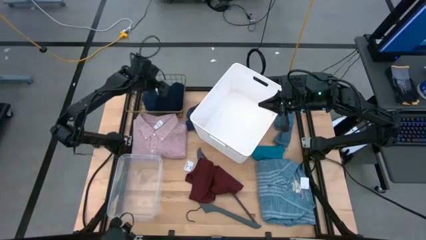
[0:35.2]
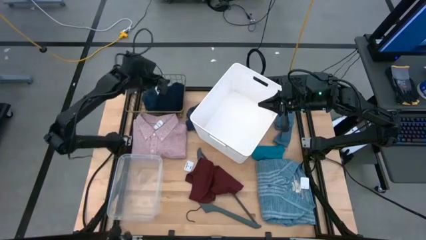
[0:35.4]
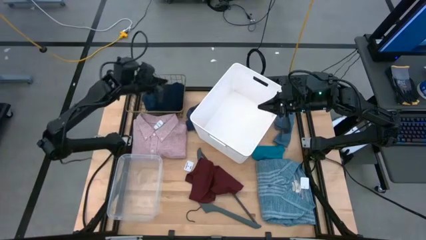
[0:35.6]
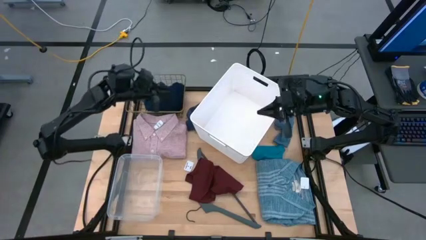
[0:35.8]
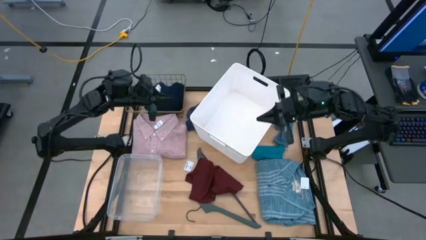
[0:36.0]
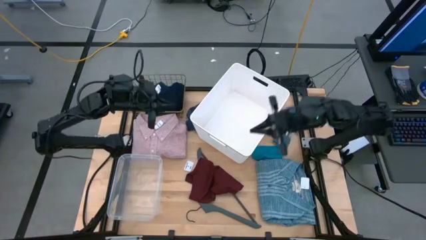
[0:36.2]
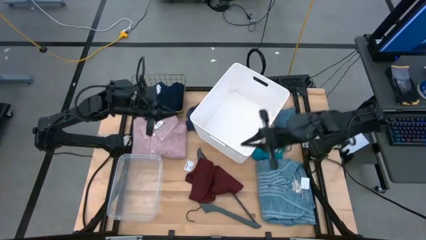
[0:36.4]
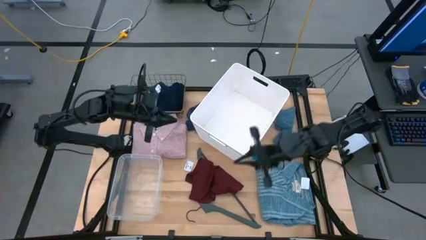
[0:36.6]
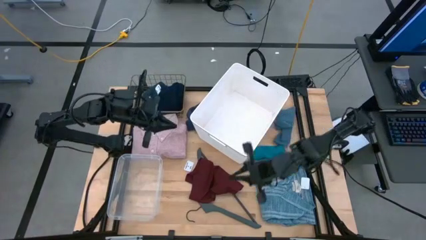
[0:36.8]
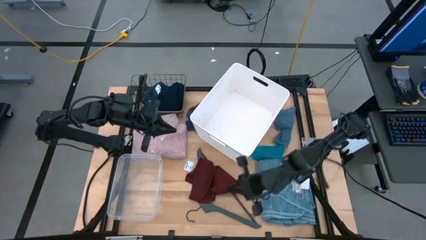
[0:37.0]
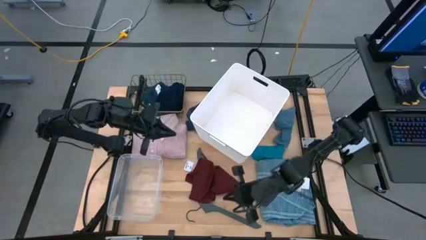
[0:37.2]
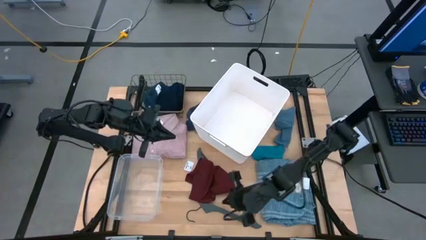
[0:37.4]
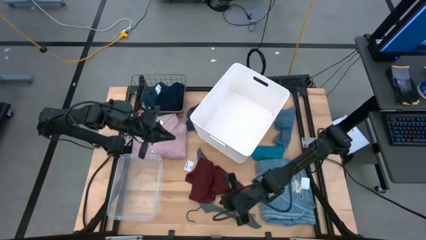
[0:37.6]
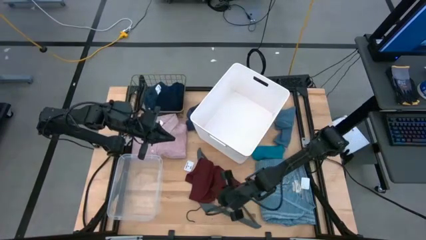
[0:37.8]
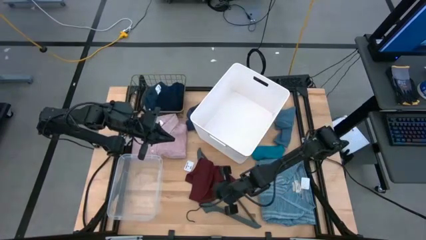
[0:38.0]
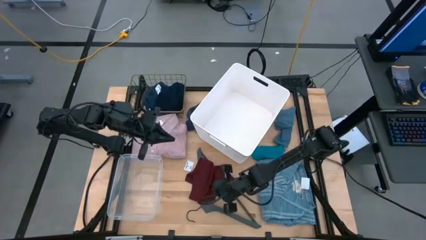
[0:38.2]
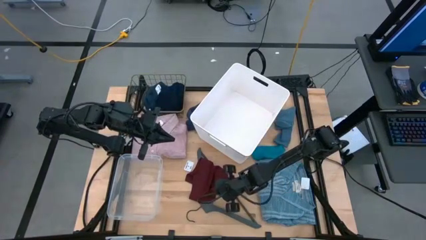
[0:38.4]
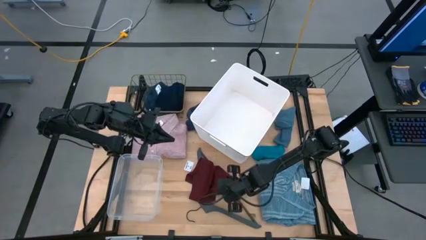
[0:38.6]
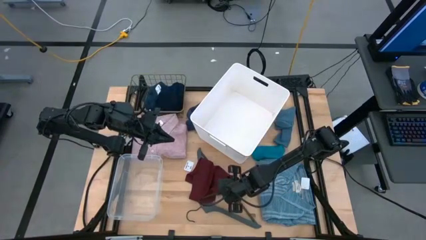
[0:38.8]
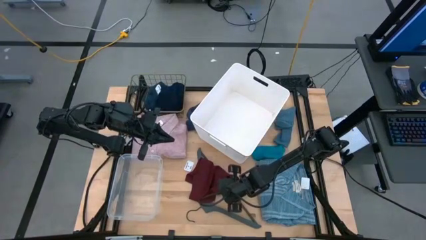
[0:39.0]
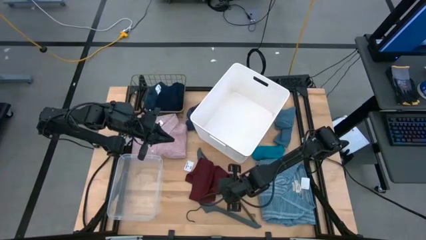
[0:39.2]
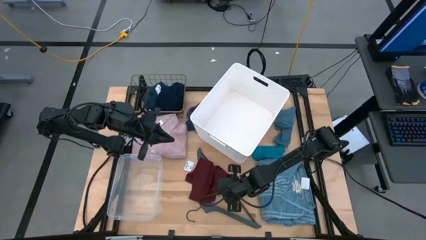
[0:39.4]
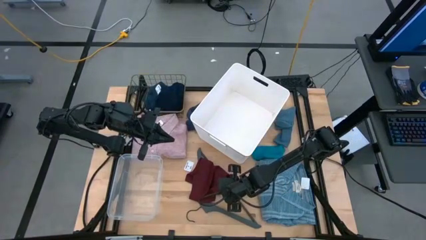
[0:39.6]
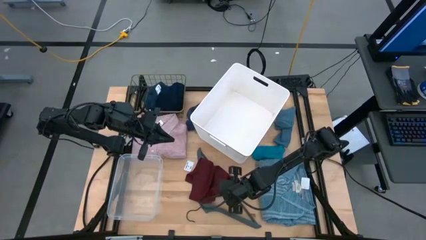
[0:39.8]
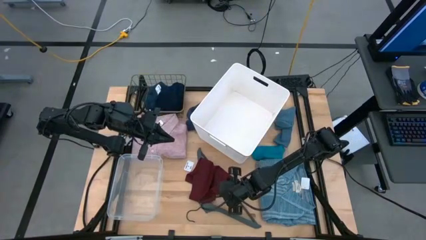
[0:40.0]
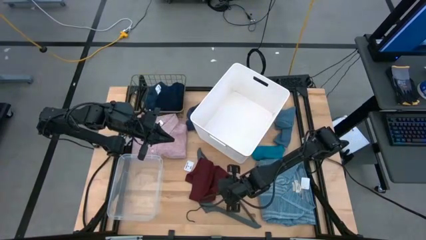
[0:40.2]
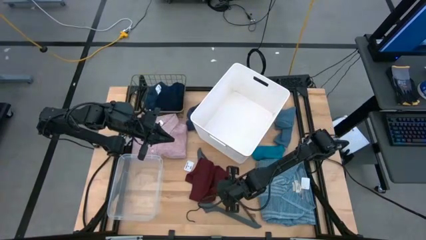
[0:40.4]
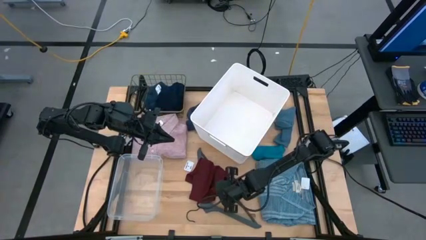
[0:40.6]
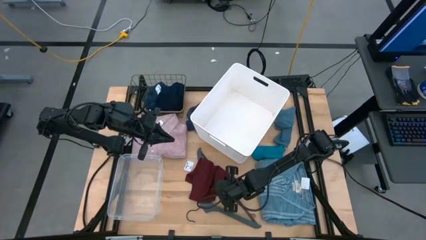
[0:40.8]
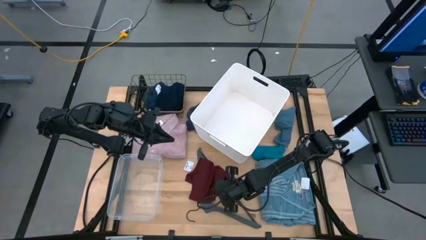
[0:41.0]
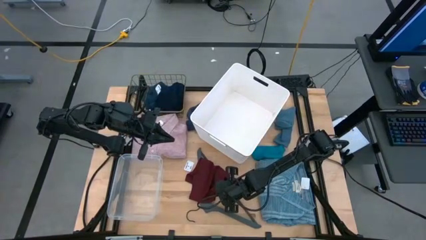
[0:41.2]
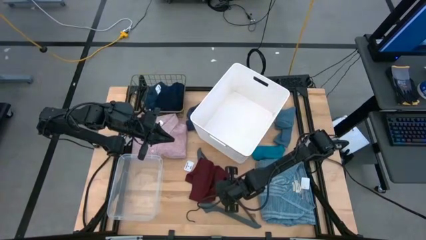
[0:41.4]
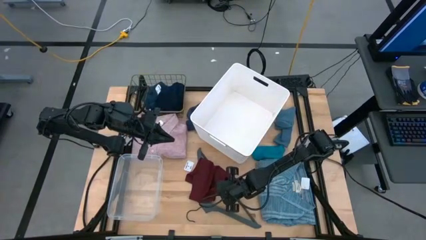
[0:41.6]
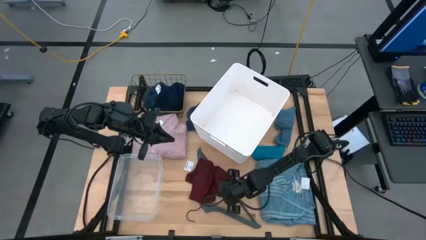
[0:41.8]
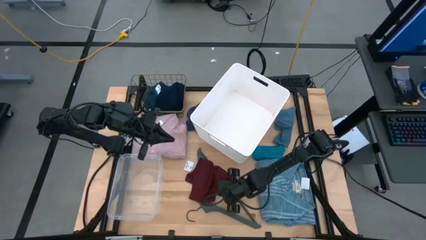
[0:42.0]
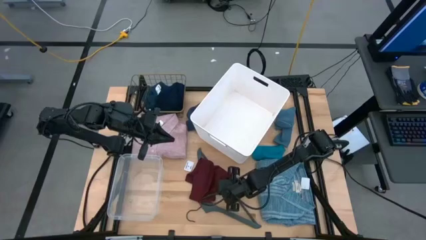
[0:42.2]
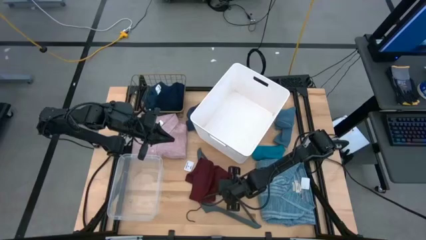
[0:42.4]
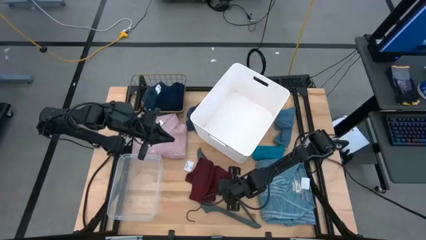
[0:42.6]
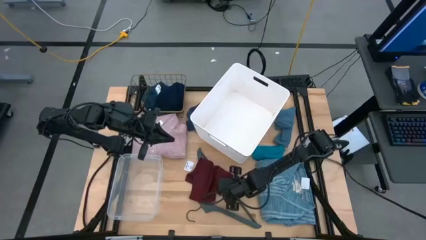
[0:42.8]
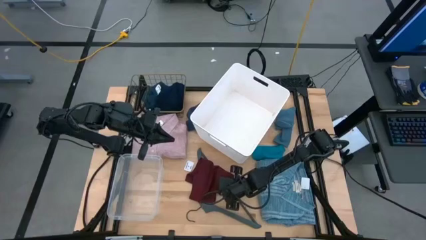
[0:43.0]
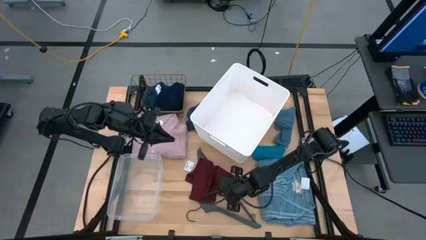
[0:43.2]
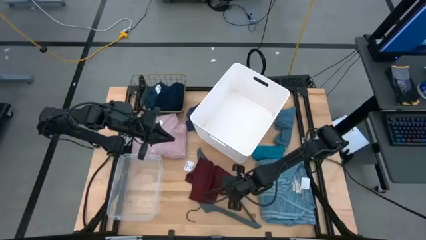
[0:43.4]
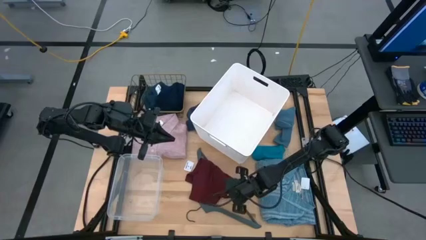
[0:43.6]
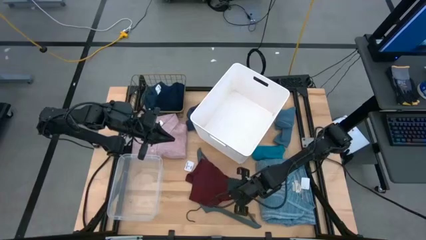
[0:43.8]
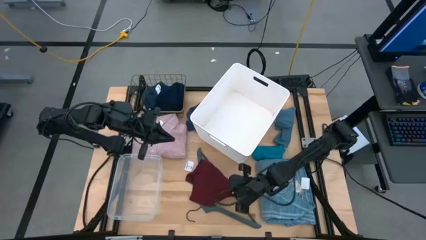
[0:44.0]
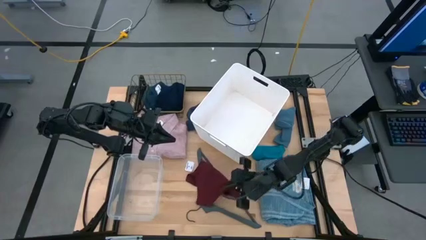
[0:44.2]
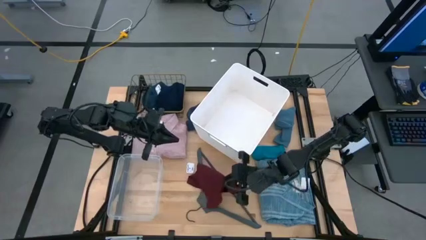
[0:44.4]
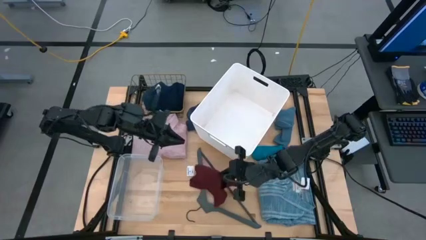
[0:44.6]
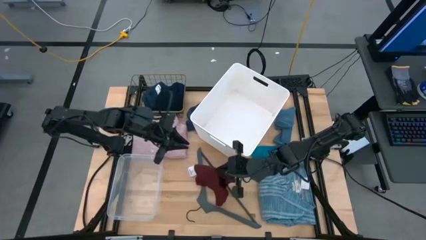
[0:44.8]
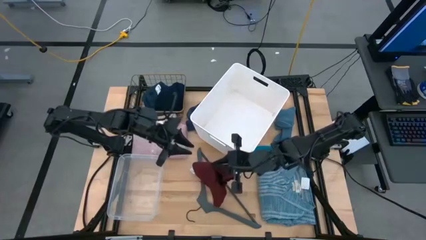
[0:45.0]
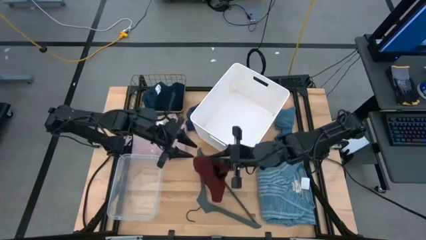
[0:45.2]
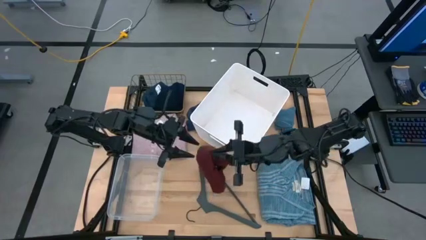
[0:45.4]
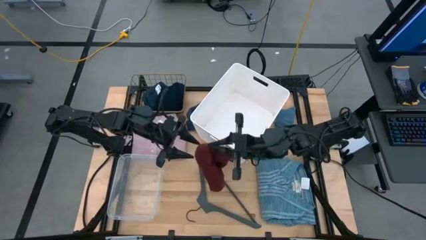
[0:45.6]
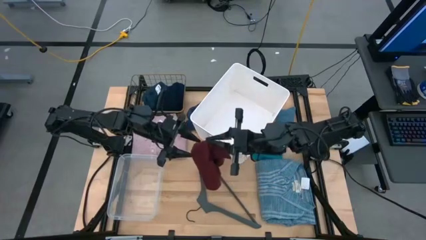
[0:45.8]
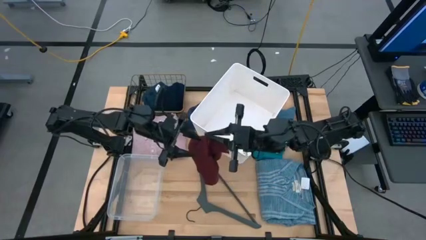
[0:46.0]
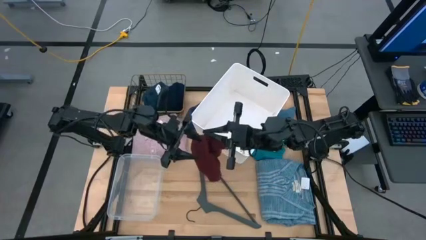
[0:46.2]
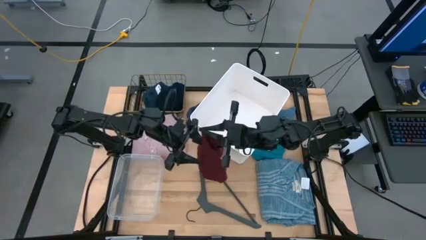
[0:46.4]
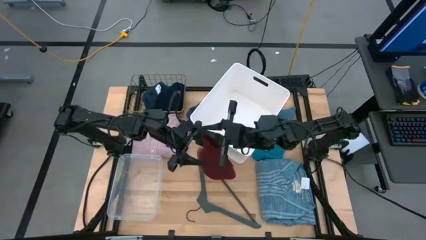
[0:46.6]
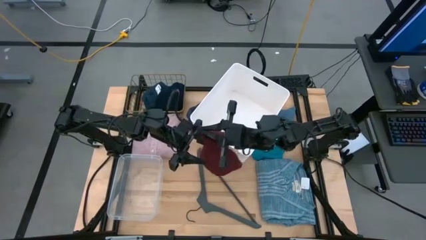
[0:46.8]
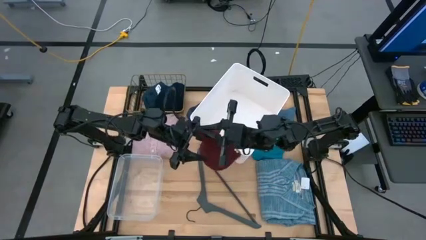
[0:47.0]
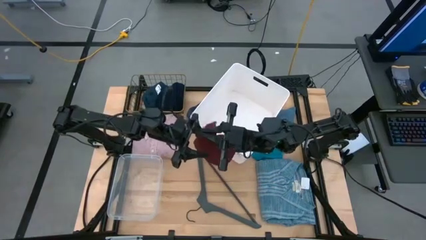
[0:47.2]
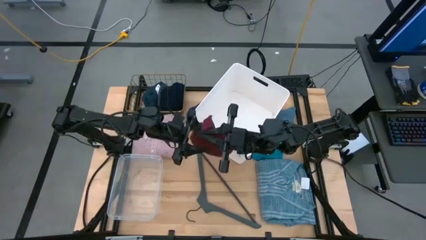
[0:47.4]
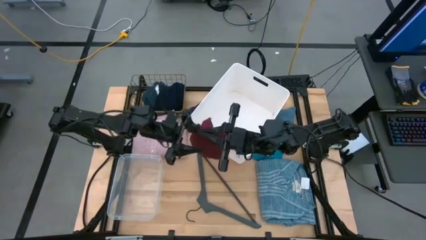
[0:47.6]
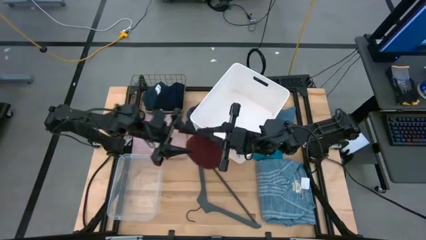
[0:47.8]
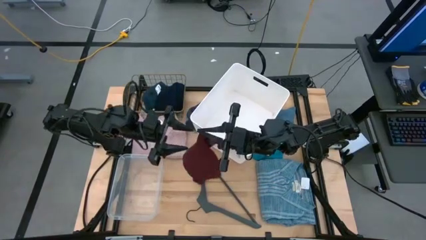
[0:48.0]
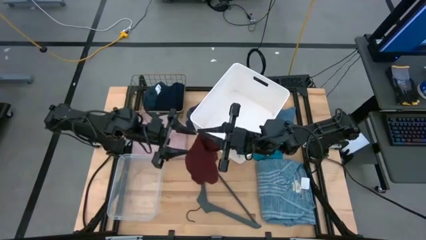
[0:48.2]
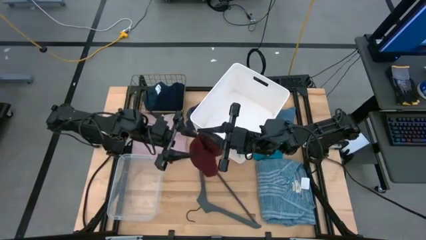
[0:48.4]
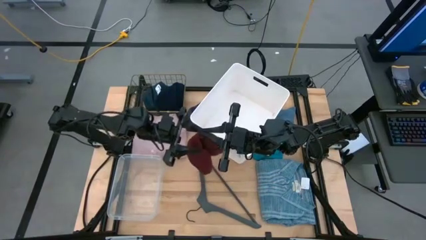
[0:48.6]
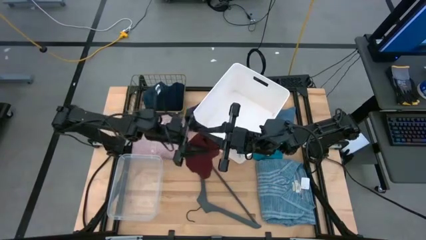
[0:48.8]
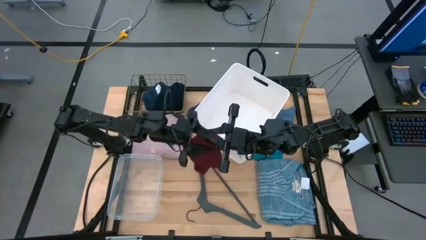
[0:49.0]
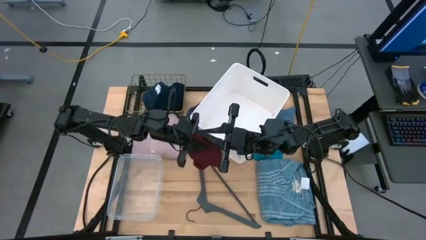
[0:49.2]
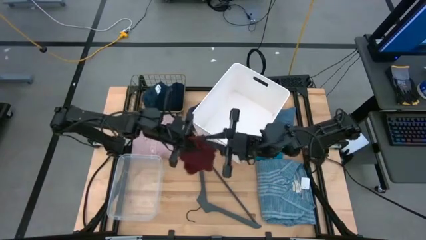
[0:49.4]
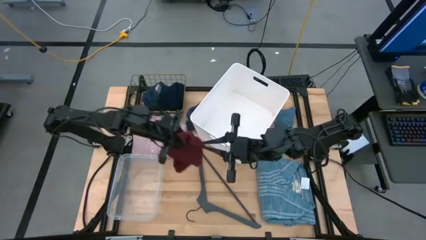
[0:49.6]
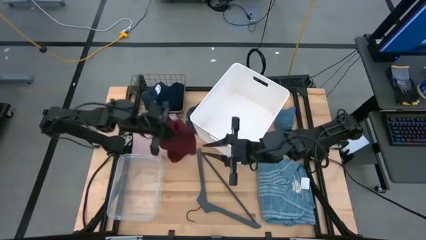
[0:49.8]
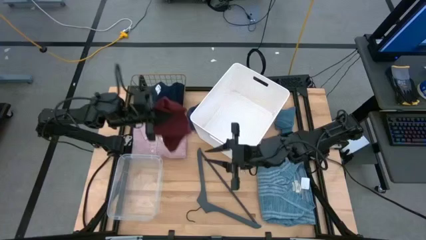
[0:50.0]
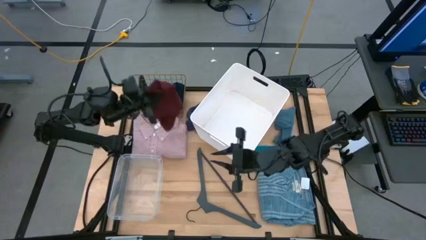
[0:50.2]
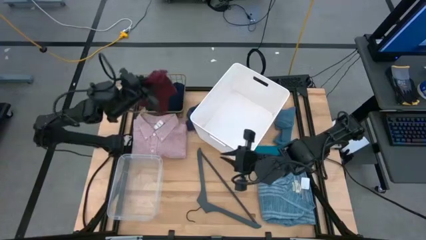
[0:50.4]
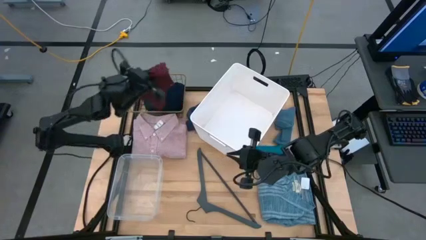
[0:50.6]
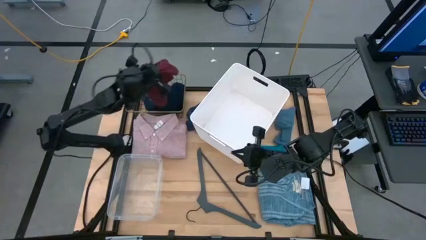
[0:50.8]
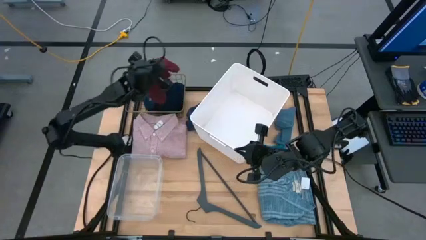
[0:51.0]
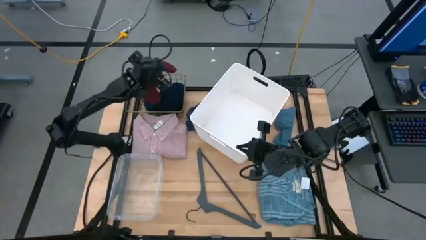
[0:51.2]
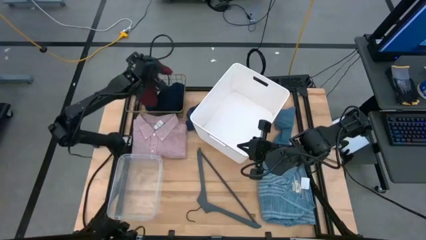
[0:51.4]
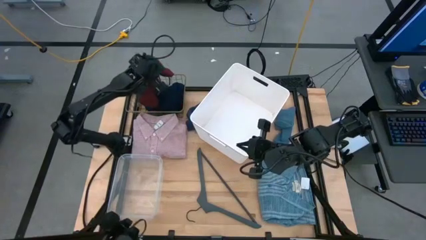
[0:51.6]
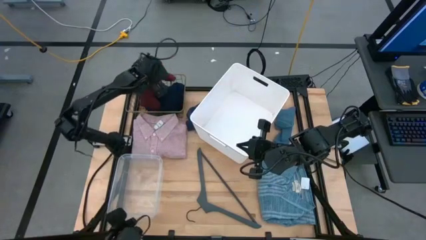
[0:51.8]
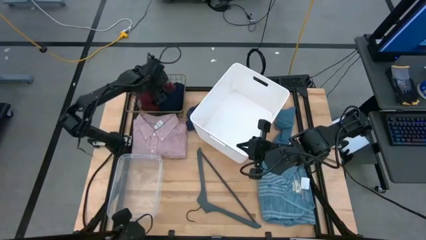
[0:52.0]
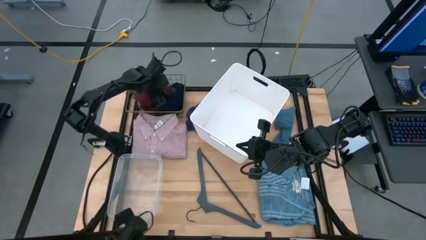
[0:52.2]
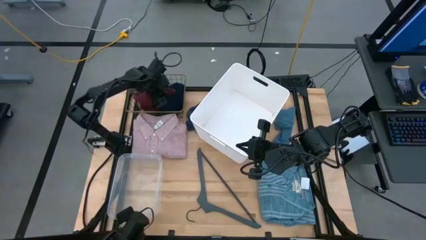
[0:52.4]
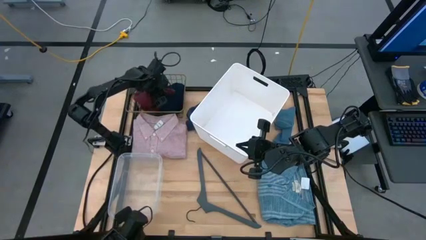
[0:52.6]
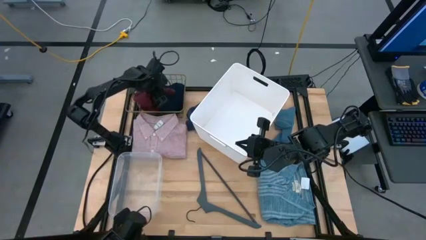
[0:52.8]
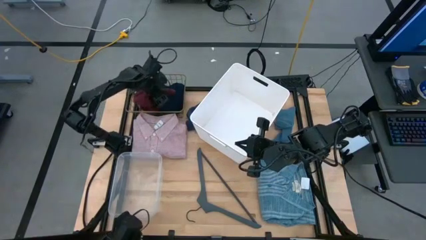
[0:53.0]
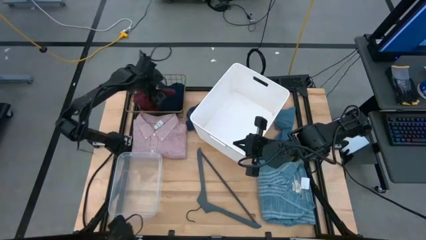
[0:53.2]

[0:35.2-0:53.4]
Task: Pick & Place Cloths
Put the dark red boxers into the brown basket
